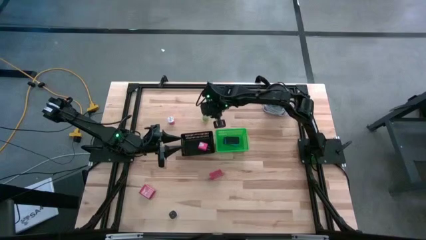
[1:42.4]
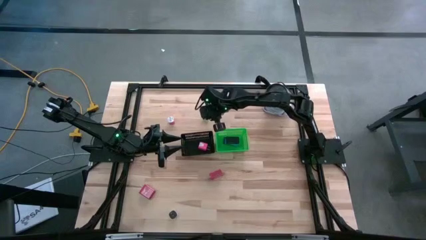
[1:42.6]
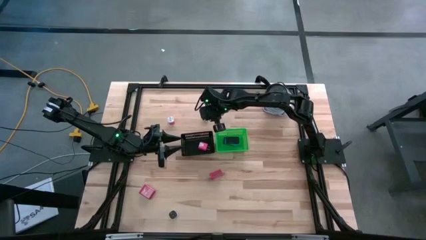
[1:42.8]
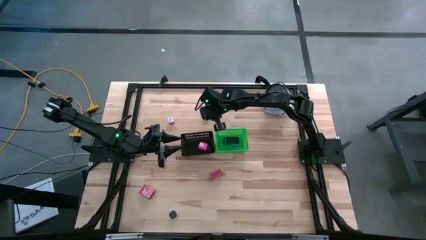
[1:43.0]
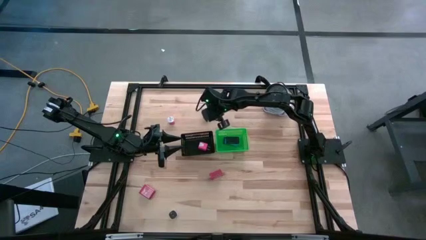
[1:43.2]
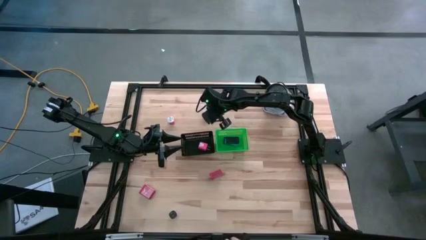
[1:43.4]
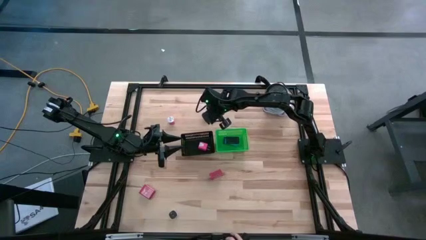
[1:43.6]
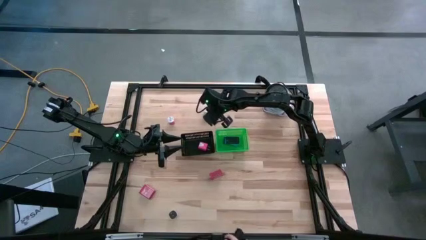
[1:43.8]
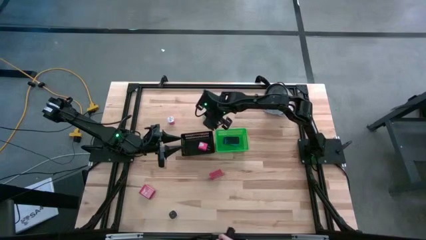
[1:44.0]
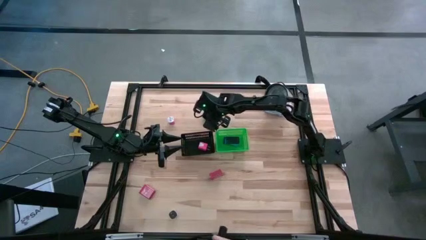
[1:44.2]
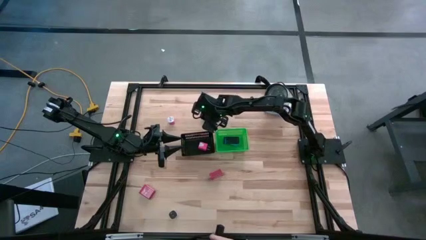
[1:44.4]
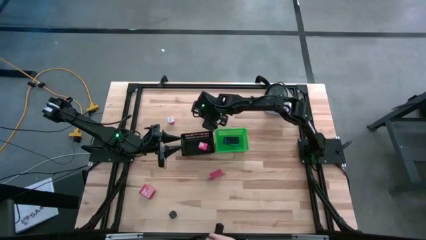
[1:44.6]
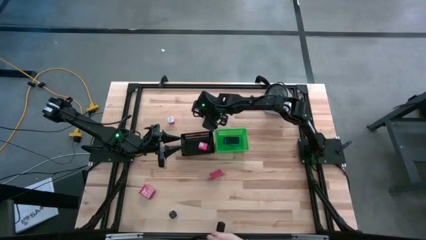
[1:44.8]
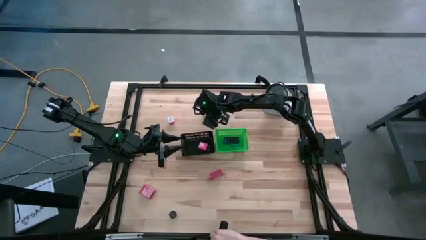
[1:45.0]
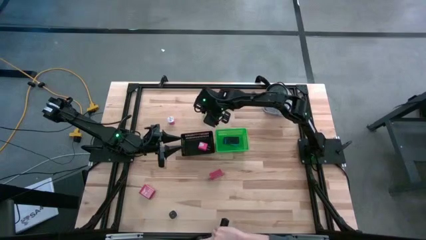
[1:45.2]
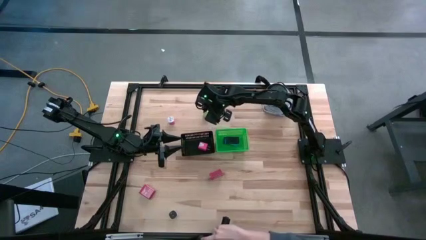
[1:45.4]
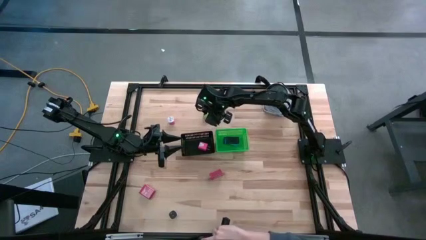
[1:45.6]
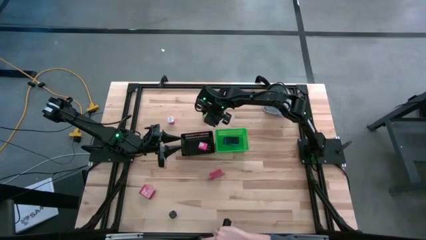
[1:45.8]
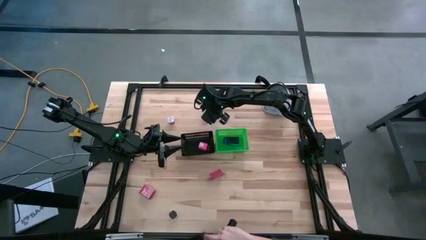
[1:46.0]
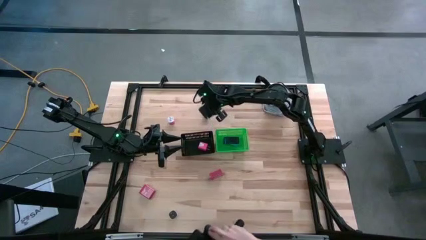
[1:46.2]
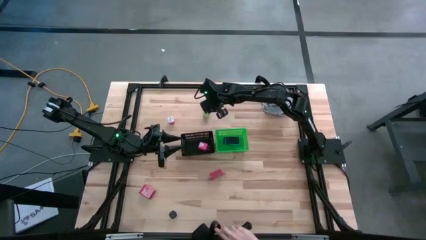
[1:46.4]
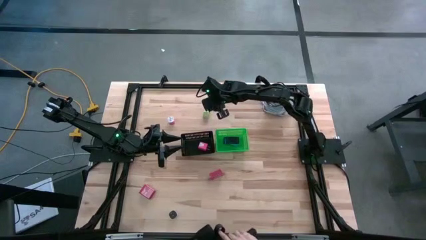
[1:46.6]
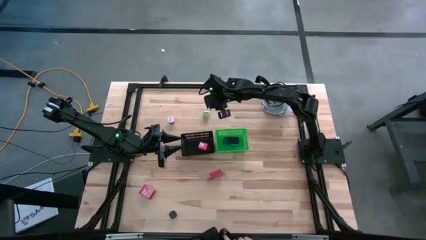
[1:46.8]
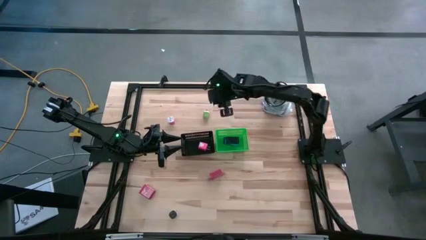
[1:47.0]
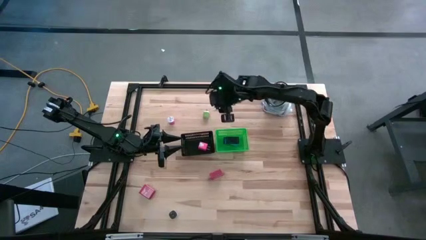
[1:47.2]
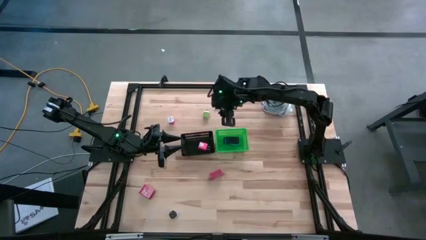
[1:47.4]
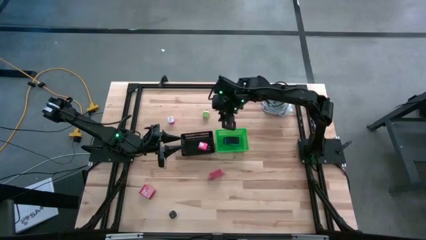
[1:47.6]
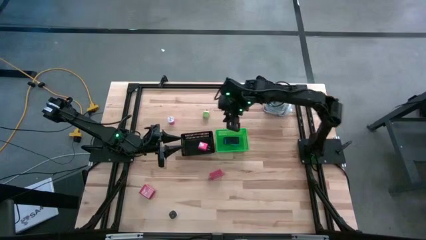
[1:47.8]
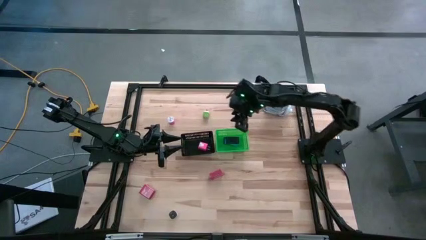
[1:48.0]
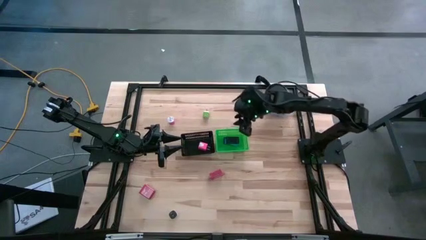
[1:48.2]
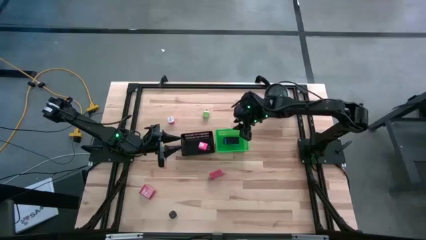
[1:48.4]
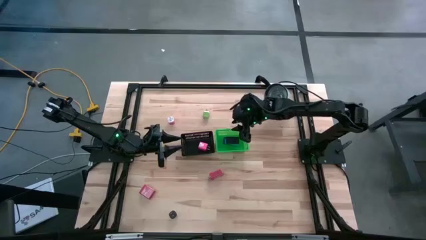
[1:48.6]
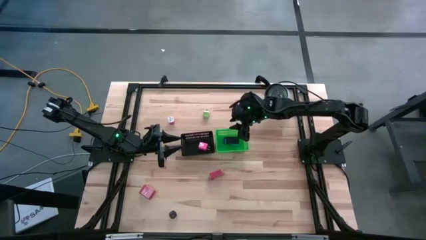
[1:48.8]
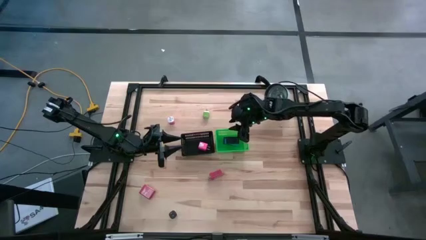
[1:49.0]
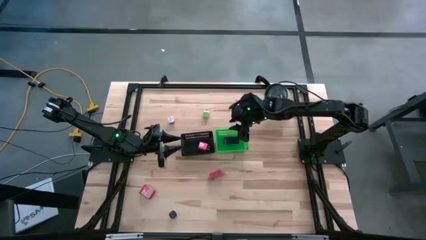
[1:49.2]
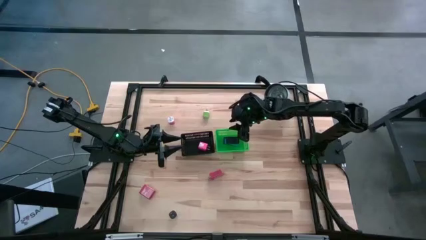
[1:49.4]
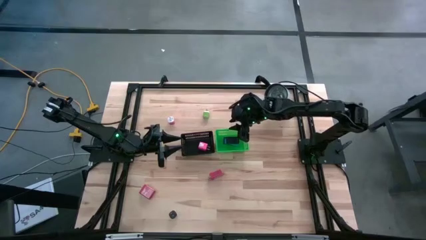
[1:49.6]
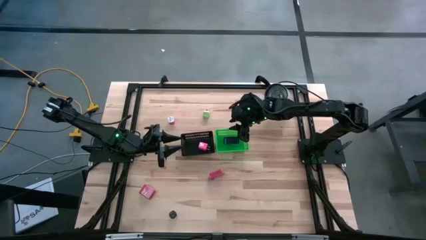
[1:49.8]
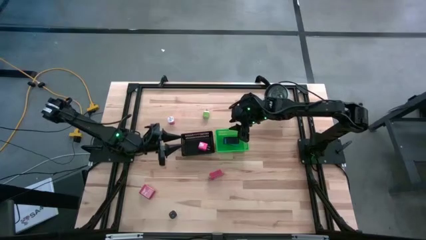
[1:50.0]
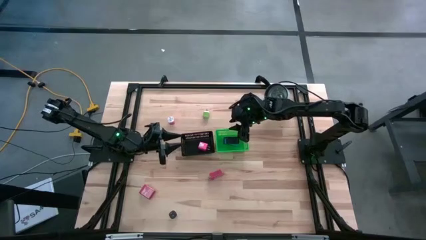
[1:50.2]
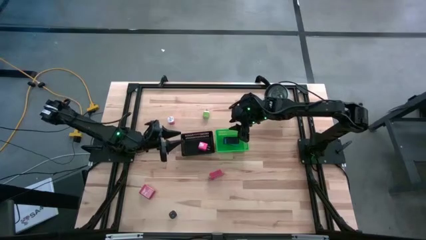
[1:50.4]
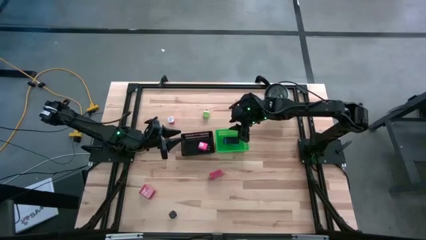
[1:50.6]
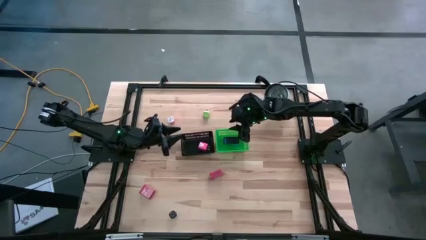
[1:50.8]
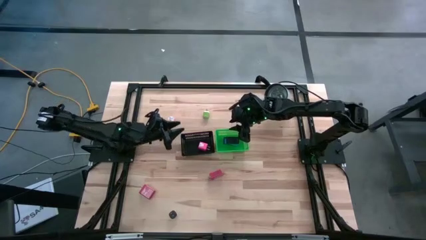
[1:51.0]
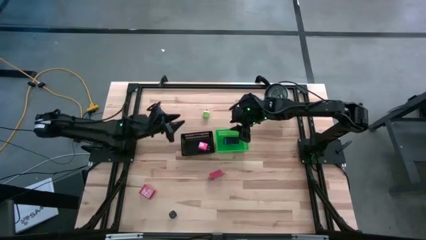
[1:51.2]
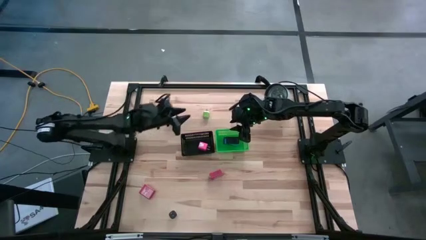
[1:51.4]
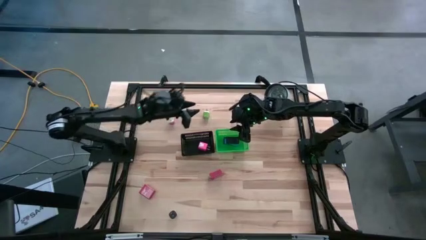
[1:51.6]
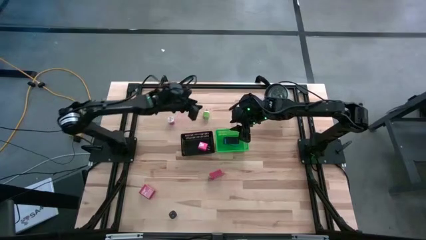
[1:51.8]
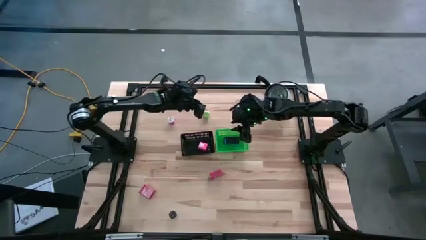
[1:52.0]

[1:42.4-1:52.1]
Task: Pick & Place Office items
Put the green charger adapter into the black bin

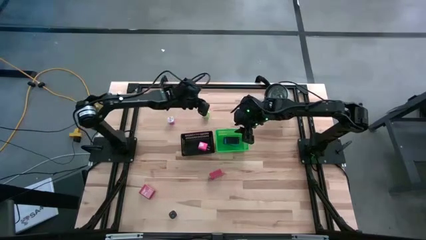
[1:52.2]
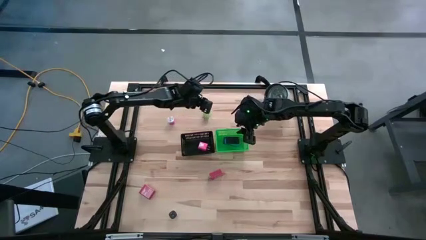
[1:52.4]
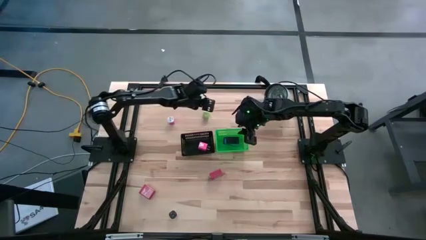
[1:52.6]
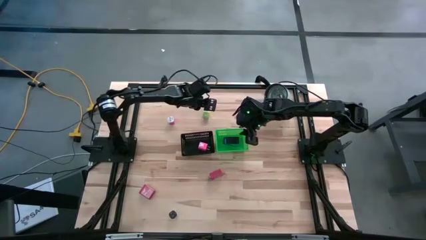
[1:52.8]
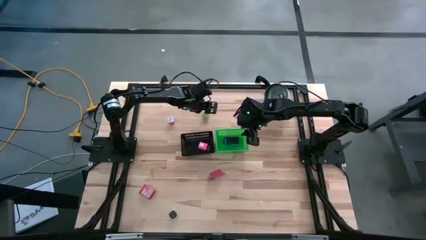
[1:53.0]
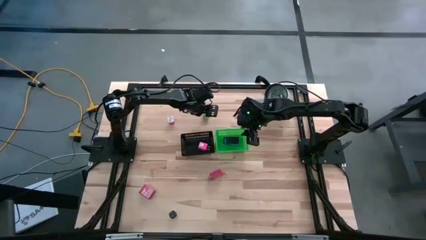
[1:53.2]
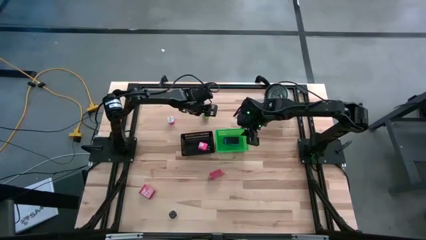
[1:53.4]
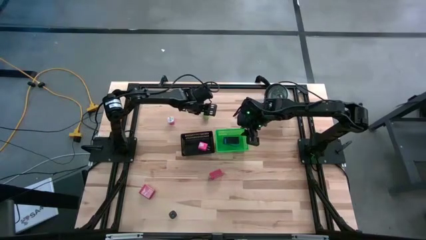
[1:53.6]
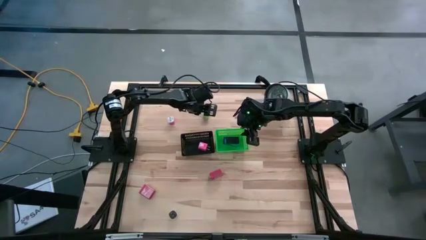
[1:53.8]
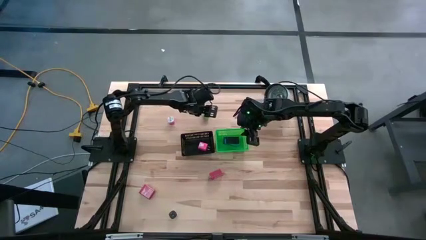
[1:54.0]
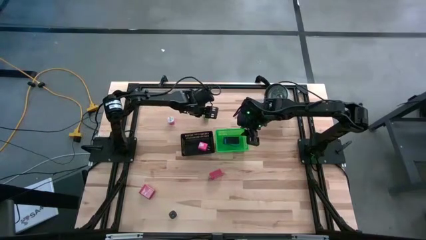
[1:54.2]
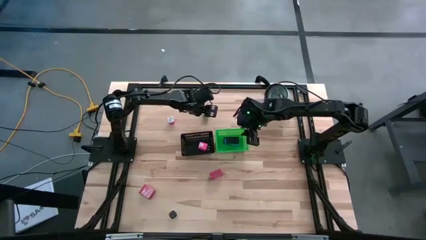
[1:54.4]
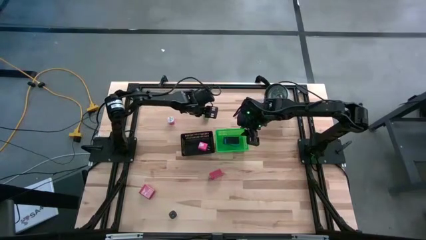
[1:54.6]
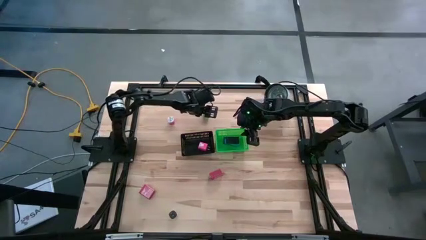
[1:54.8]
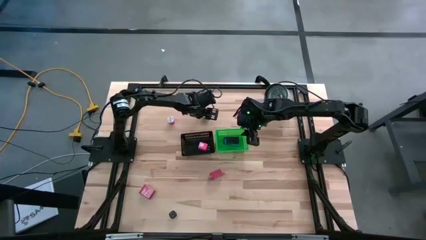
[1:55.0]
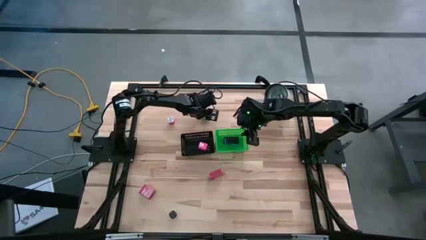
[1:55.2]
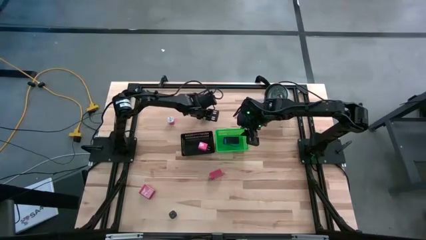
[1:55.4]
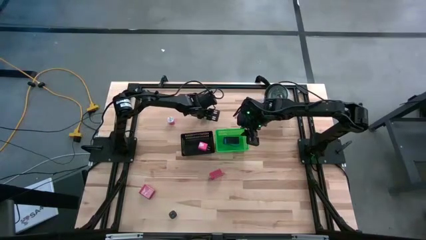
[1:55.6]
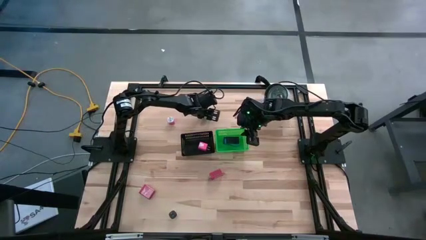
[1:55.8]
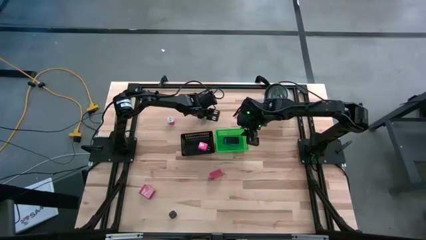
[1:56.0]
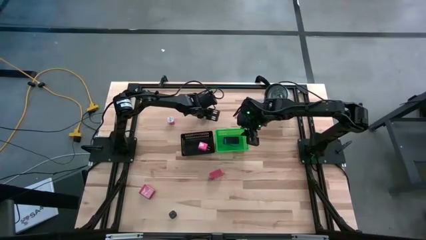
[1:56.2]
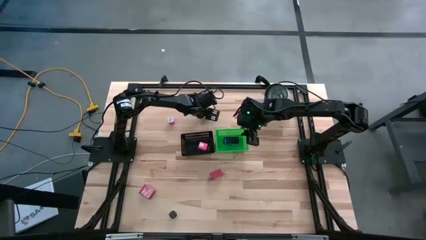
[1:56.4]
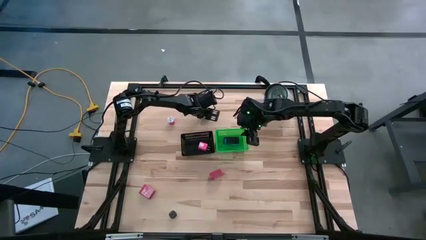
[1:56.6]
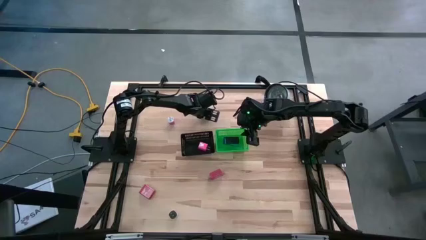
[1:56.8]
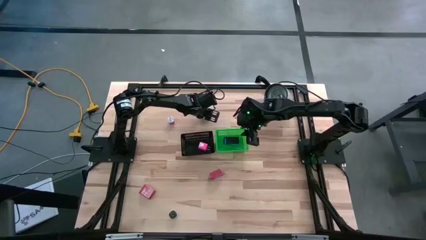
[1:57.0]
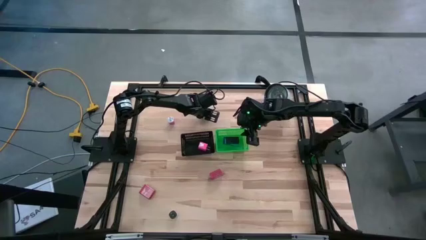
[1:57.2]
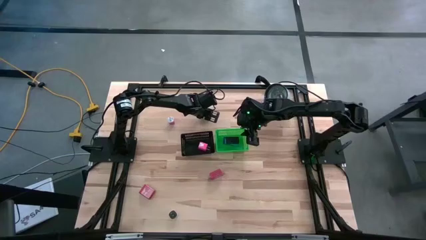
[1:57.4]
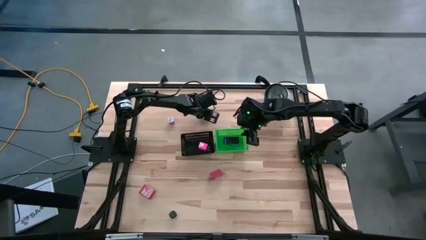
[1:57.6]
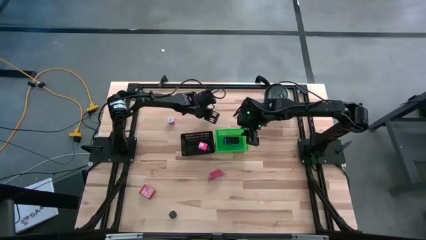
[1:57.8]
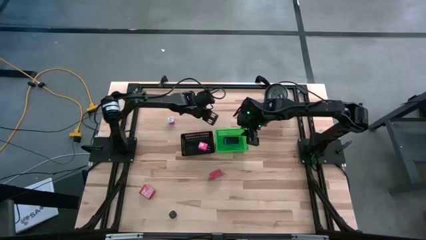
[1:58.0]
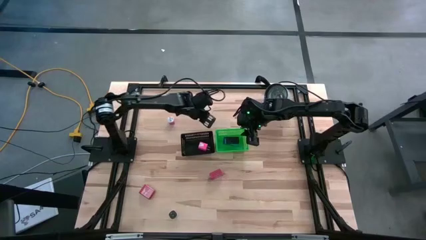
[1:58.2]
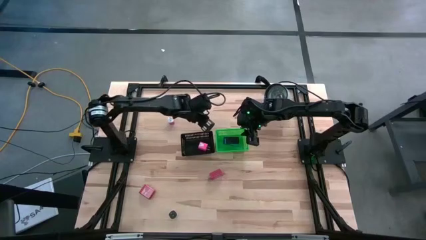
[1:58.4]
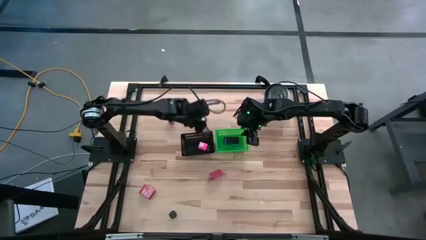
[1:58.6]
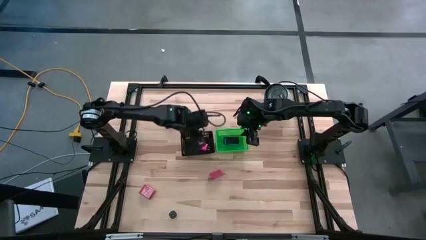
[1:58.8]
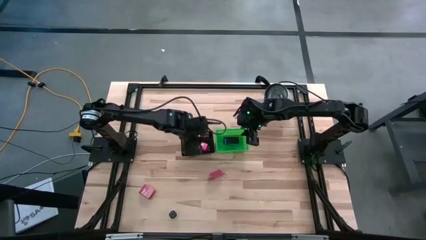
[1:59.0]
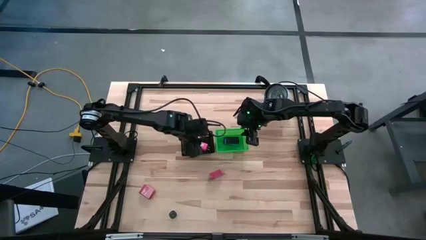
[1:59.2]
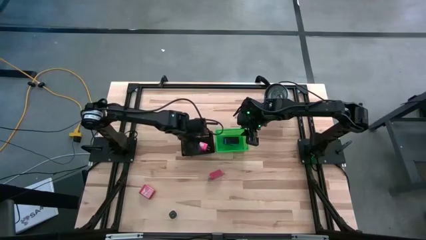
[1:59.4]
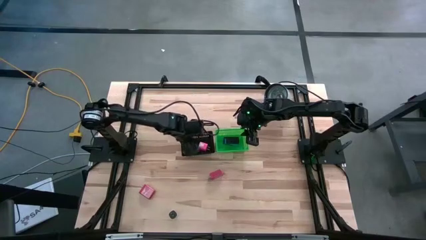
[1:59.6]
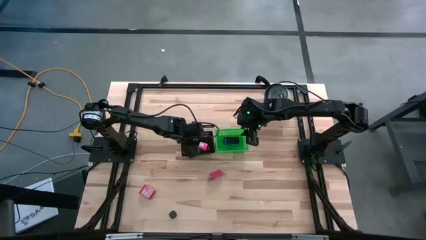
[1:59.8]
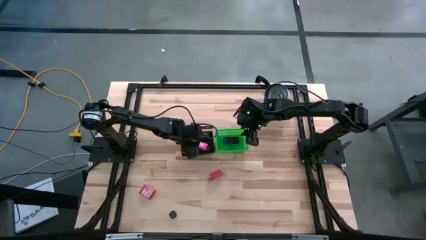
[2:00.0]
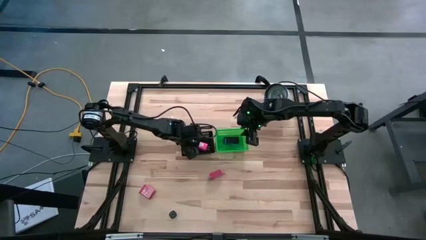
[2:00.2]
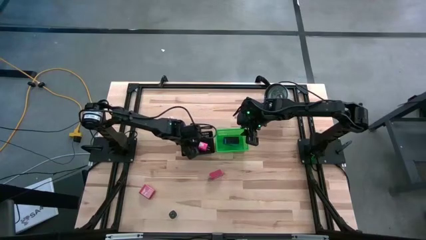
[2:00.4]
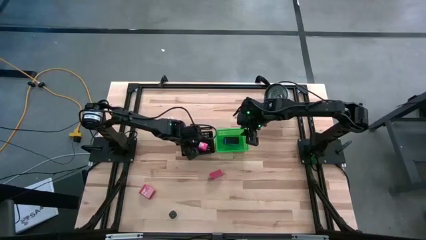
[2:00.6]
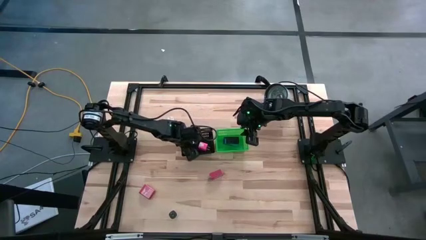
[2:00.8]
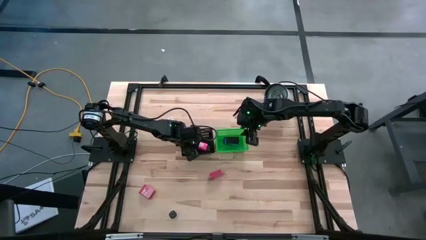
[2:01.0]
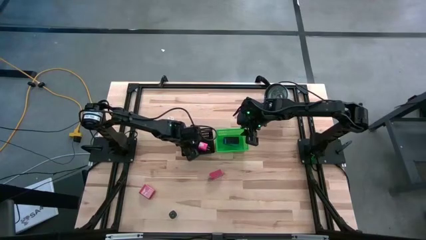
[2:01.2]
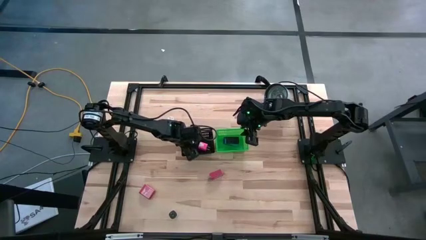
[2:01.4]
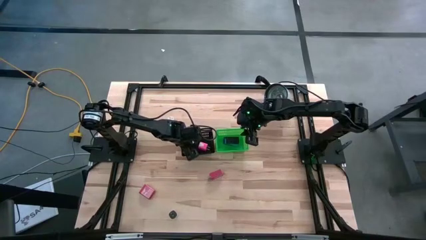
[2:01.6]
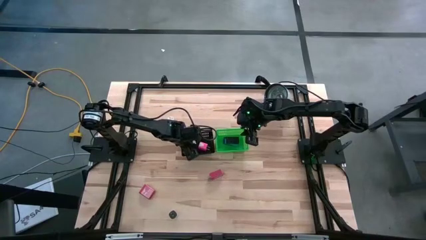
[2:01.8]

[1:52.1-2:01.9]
Put the green charger adapter into the black bin
